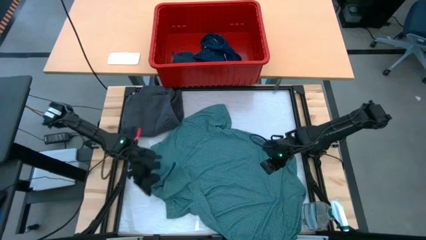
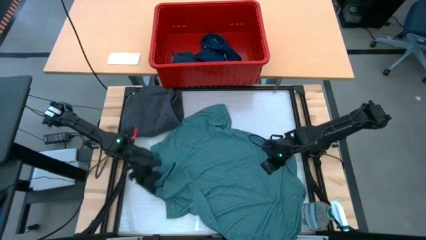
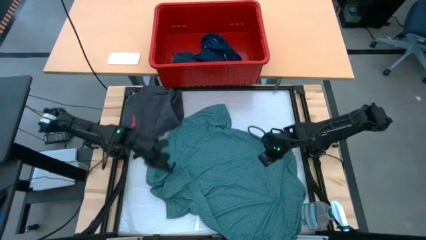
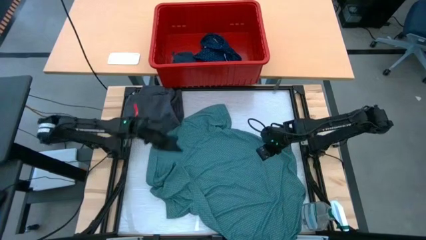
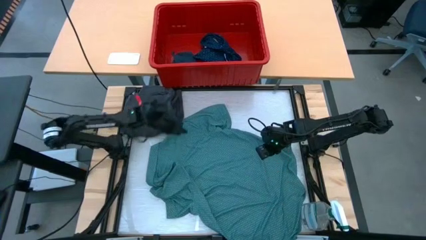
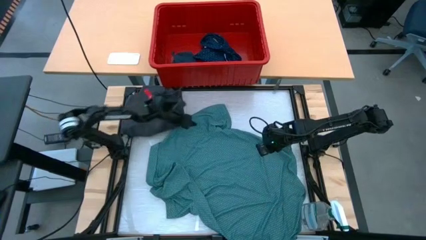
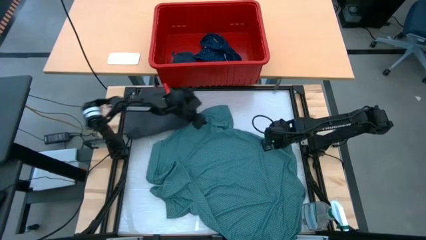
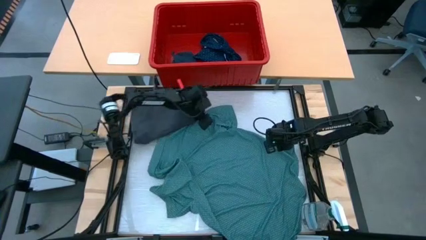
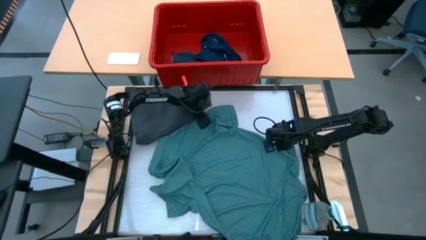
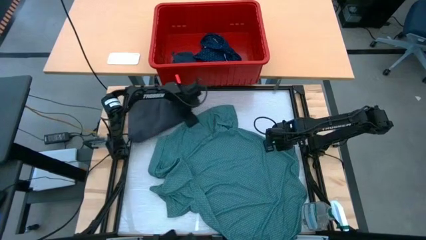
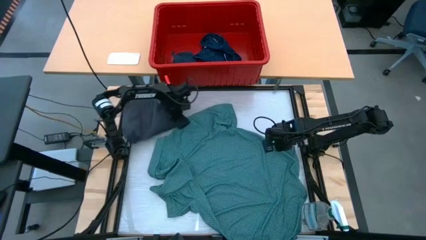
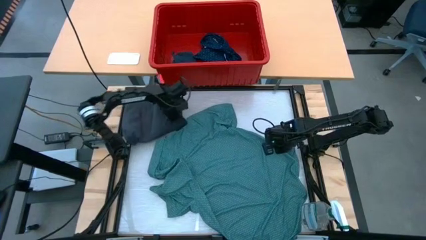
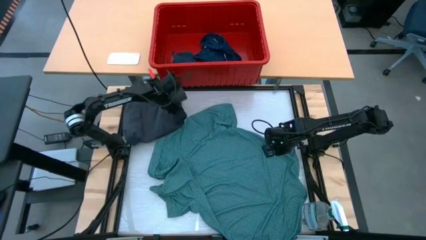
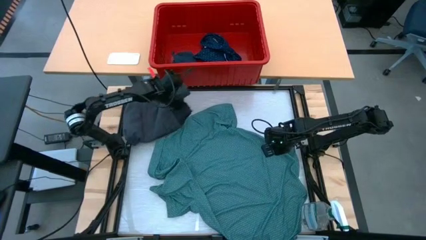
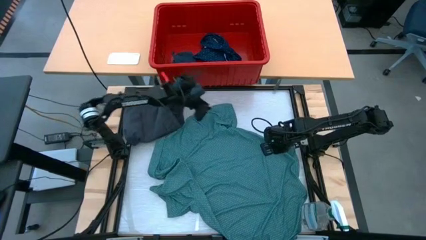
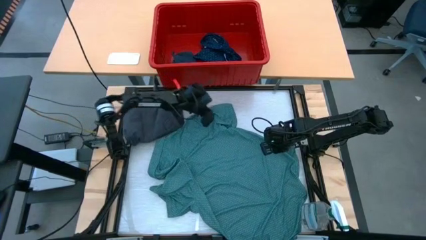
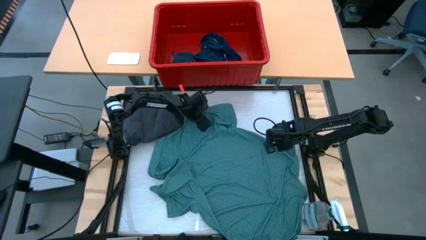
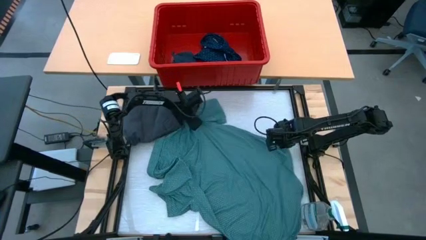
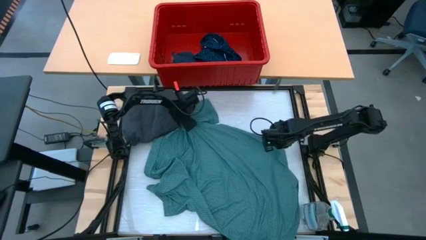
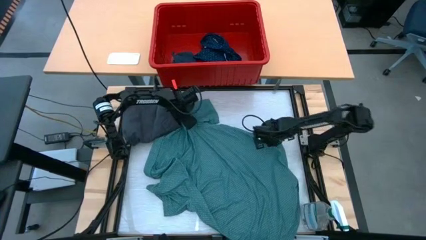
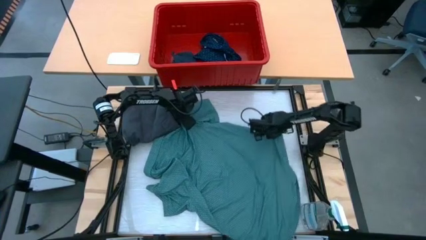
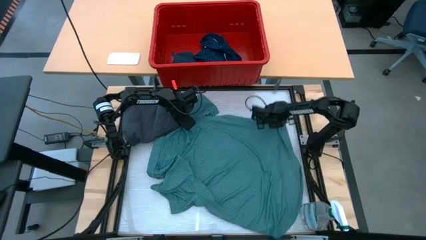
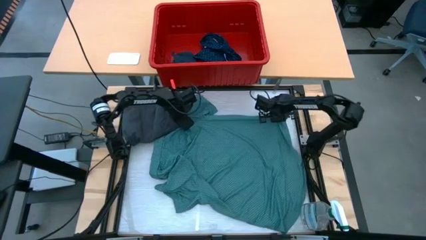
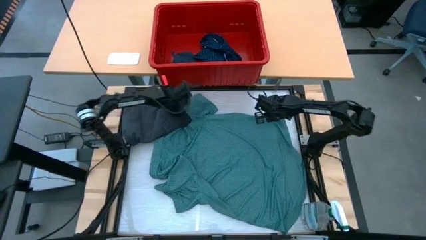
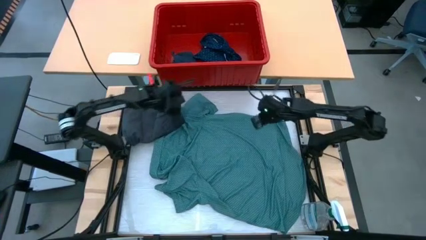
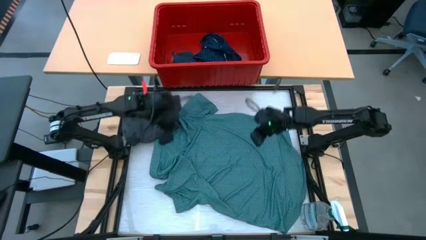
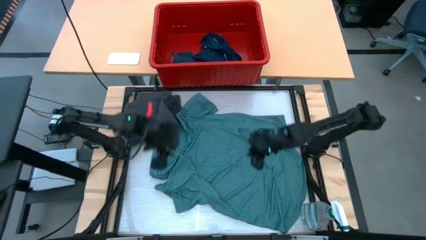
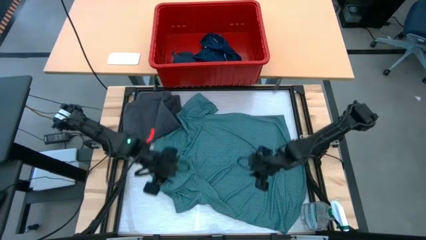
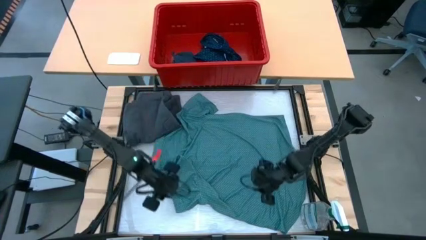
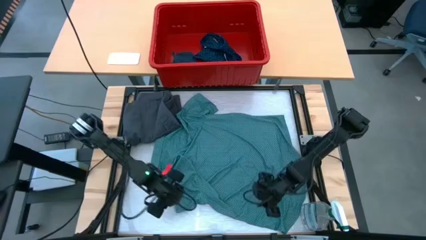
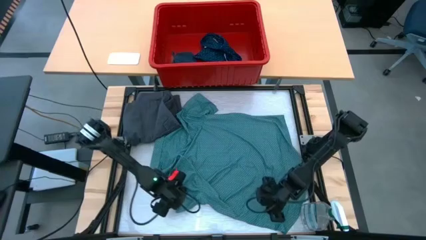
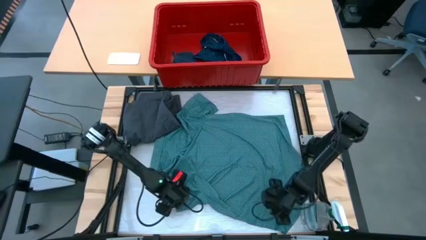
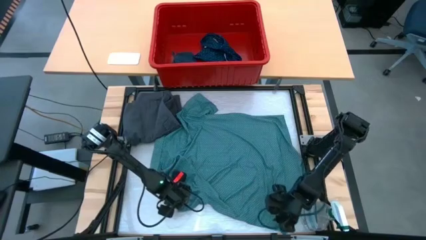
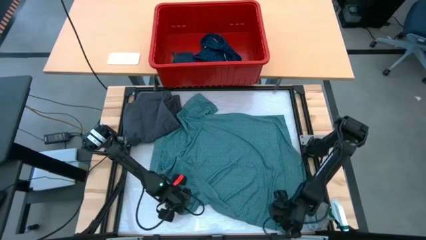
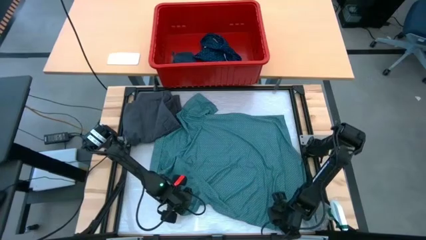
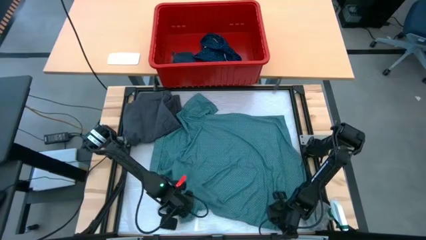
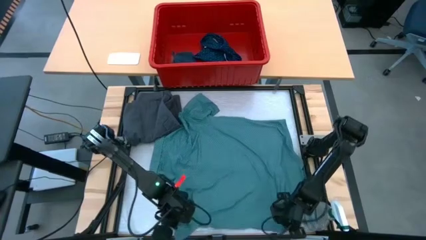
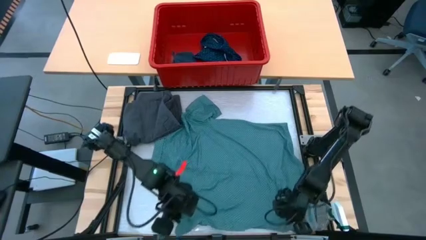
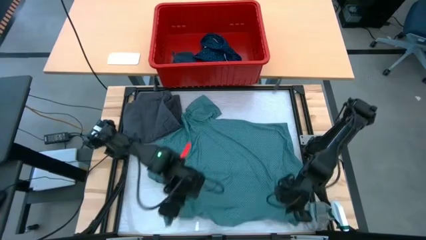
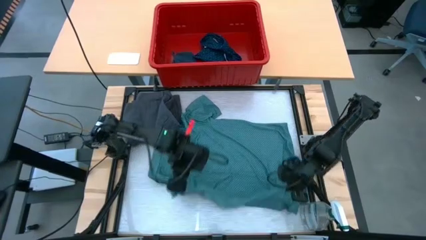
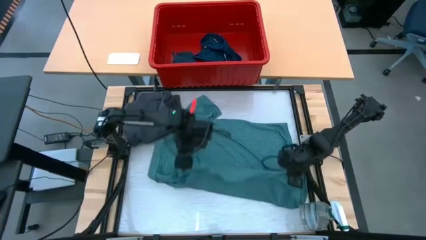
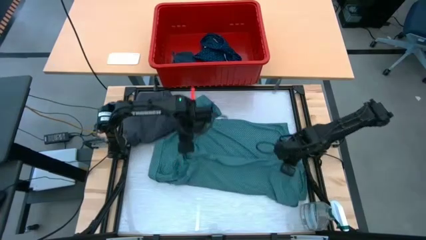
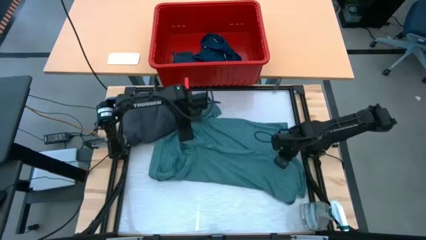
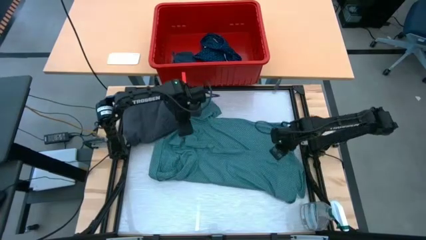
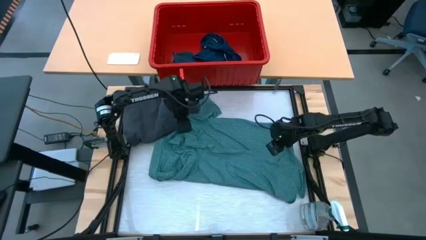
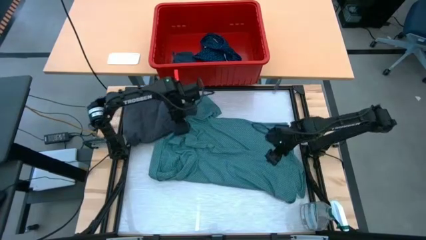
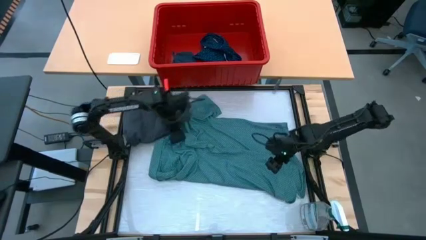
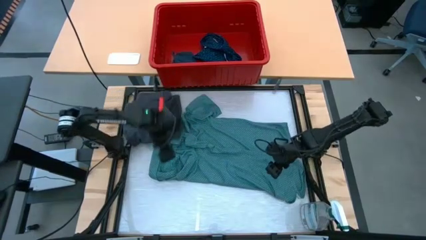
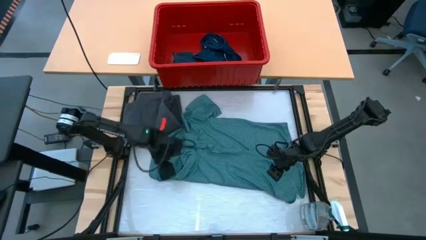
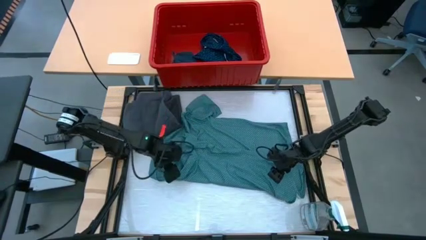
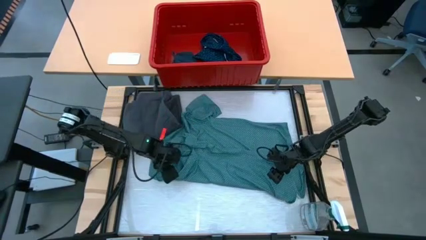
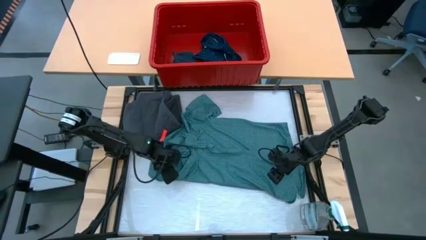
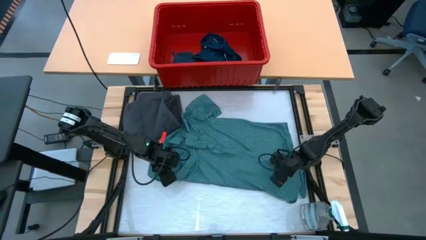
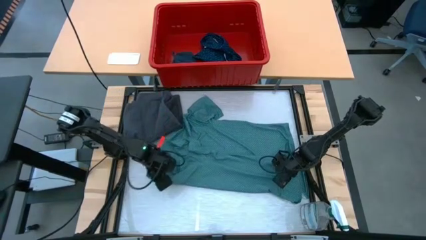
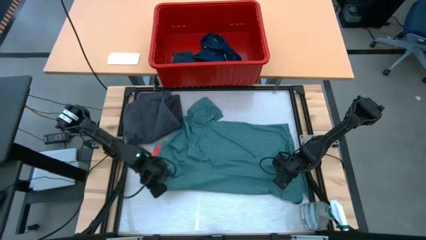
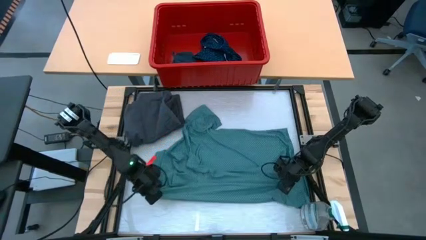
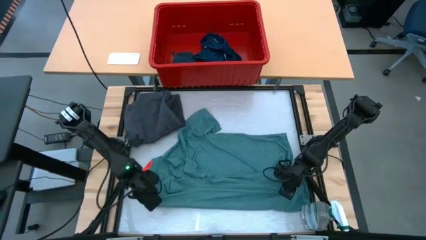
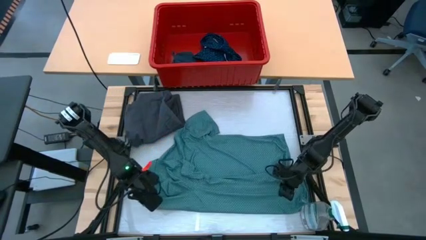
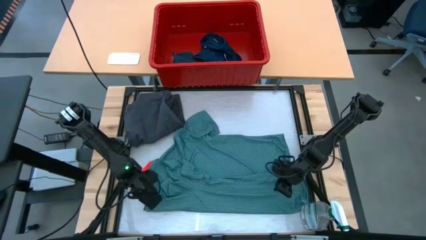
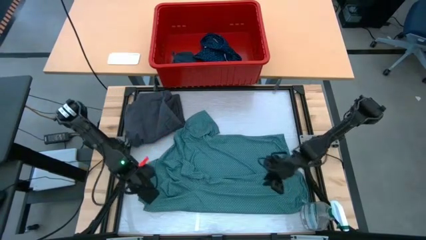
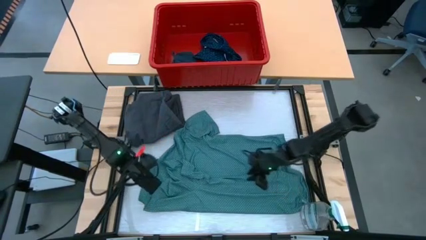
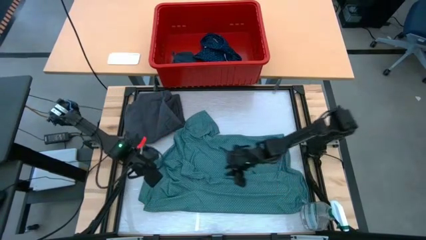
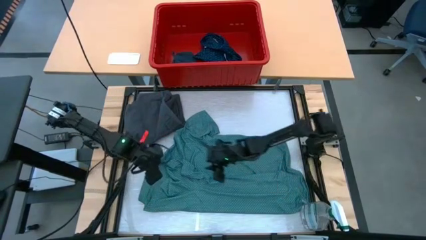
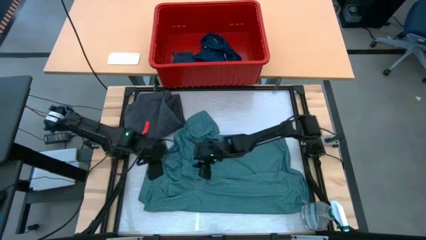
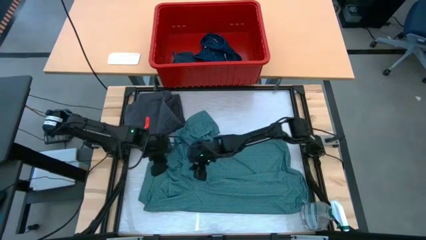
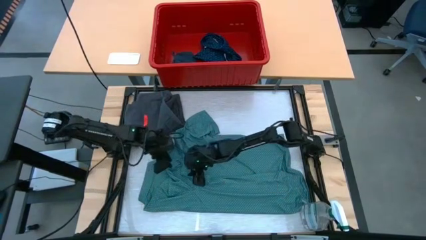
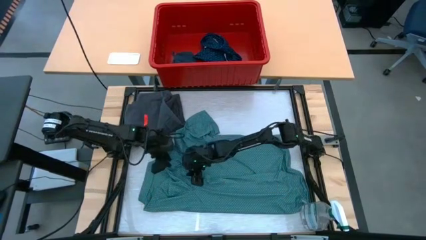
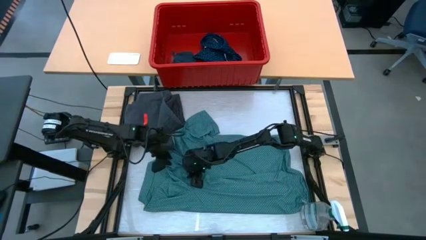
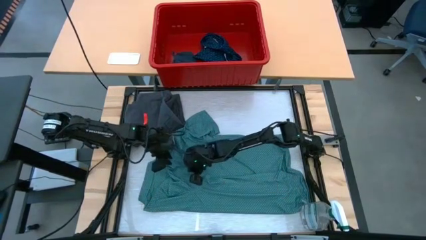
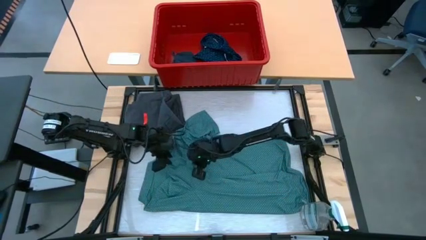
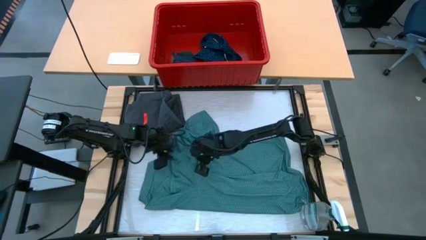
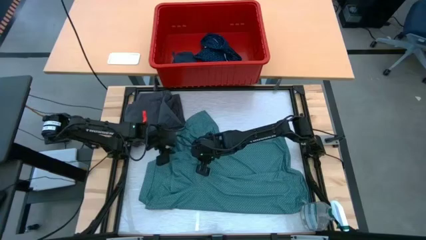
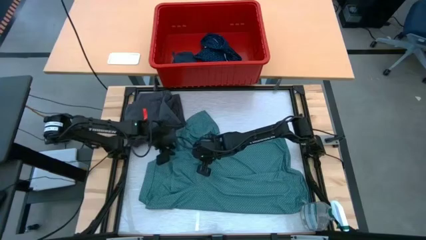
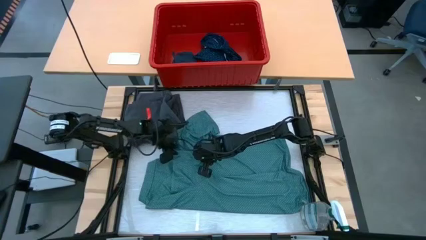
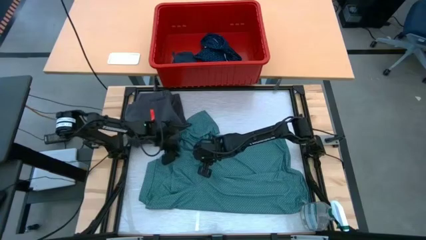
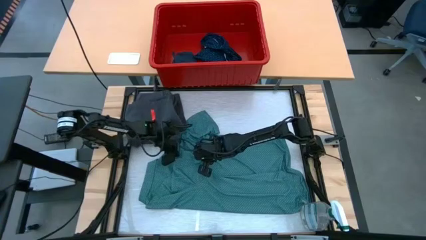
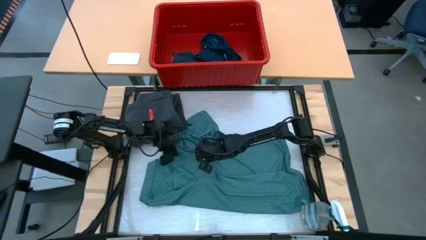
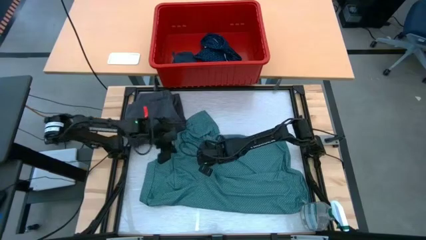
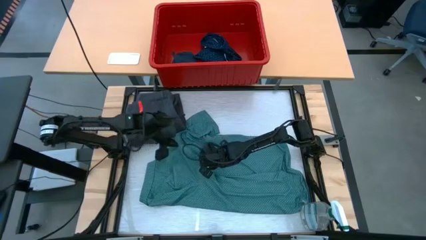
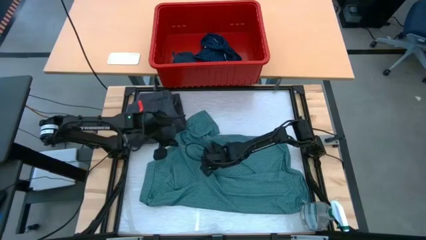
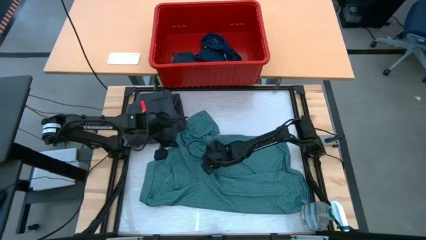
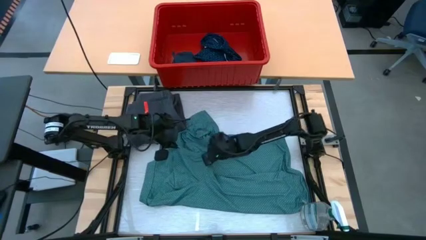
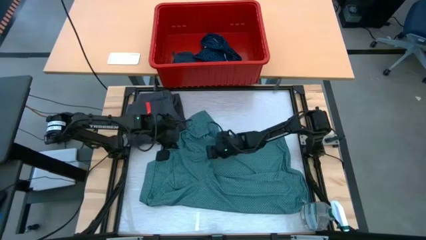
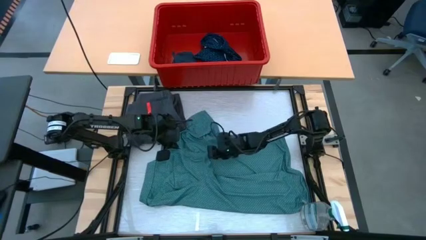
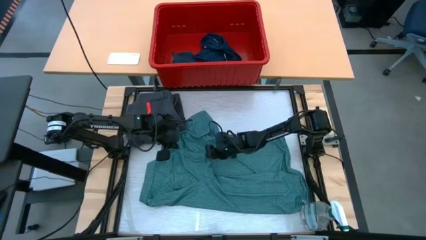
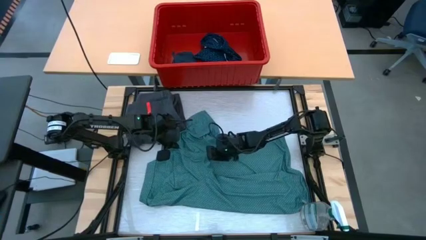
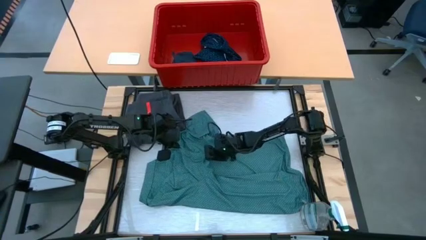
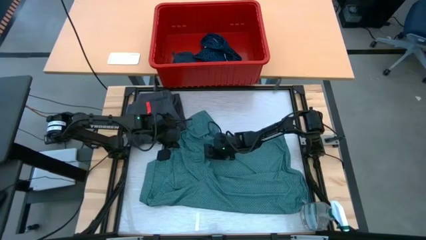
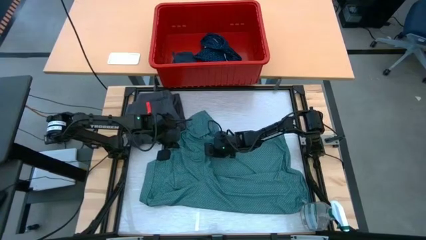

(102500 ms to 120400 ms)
Task: Fold laundry
Fold the dark green polo
